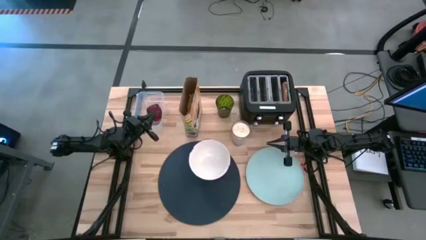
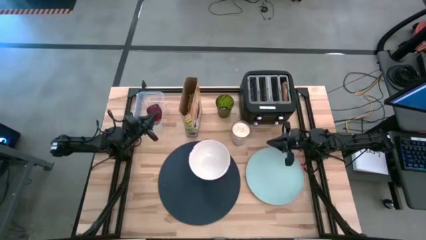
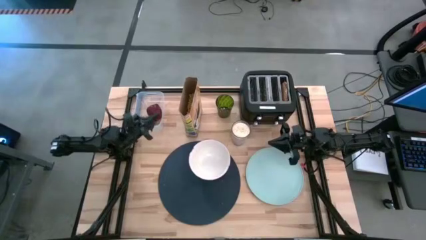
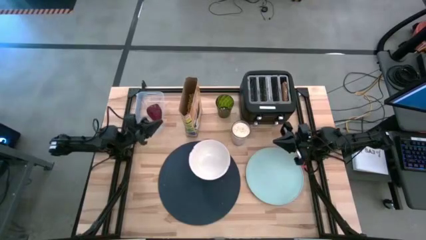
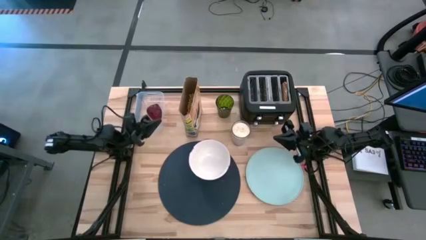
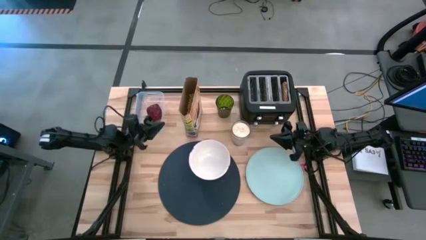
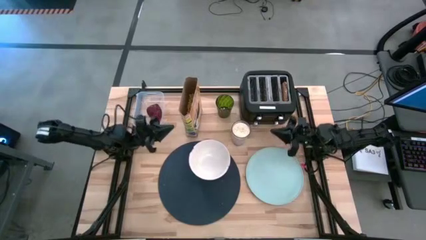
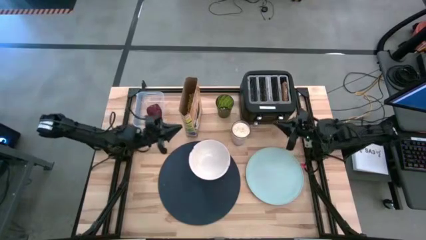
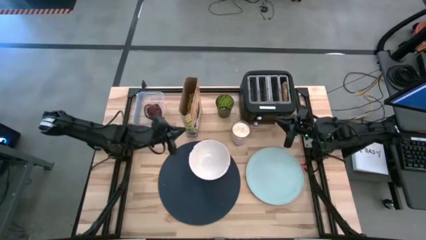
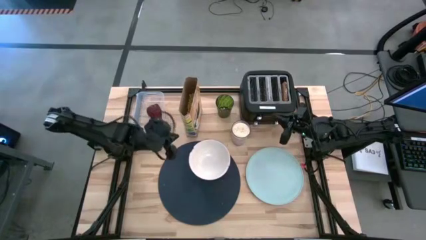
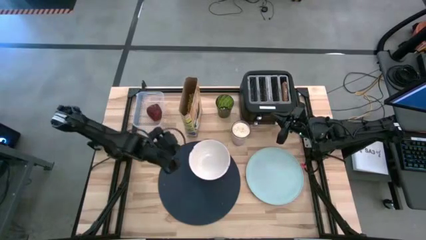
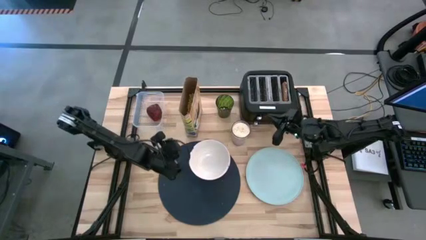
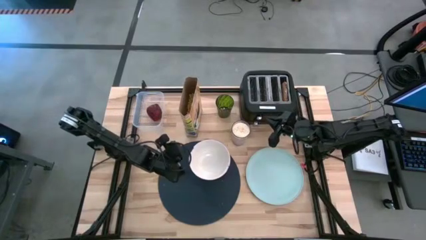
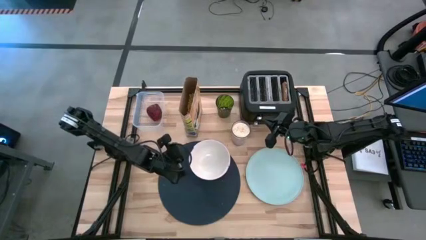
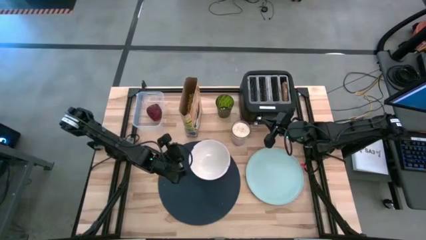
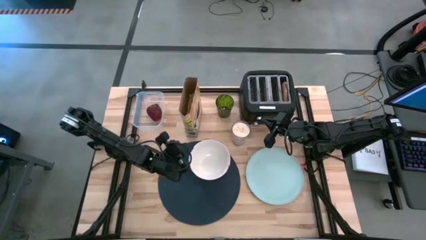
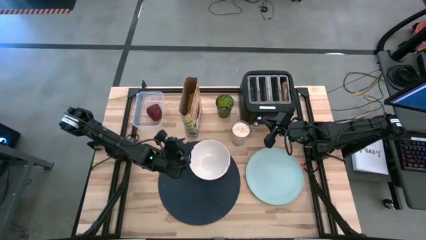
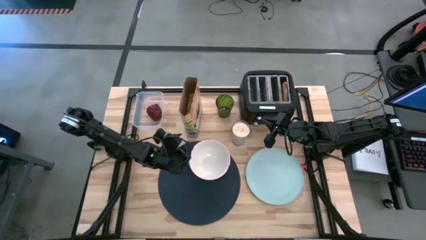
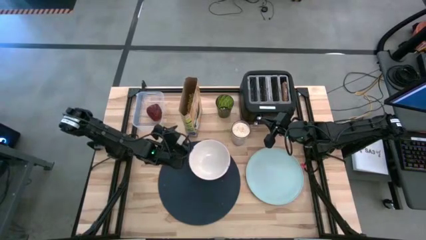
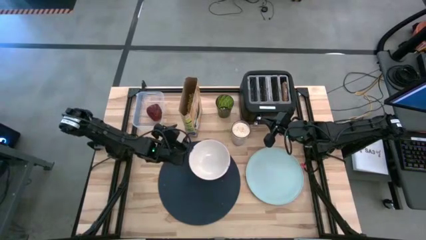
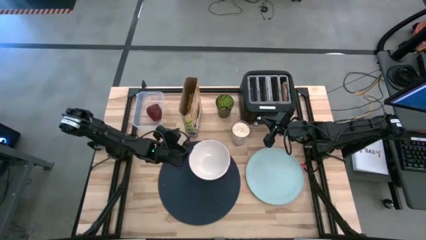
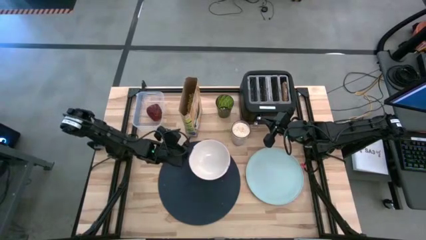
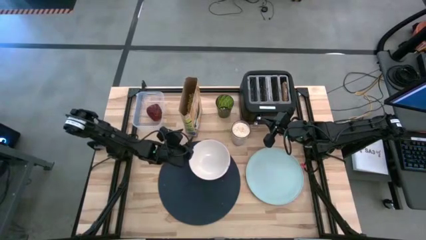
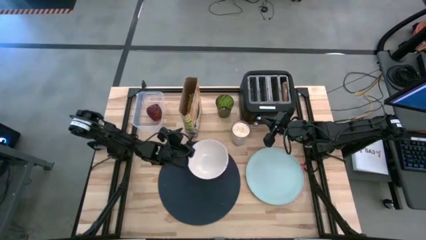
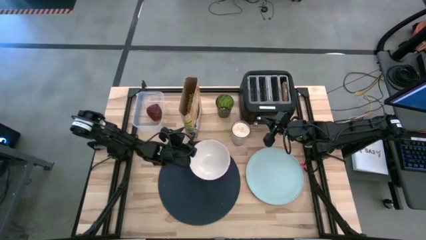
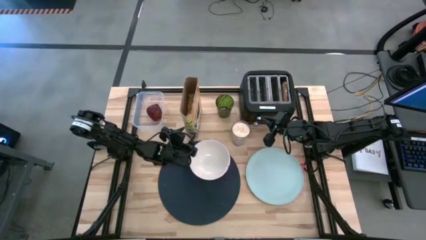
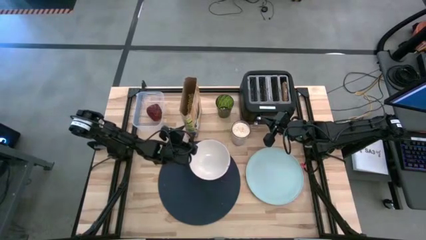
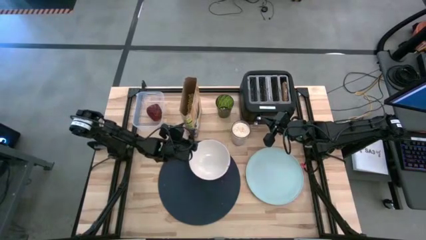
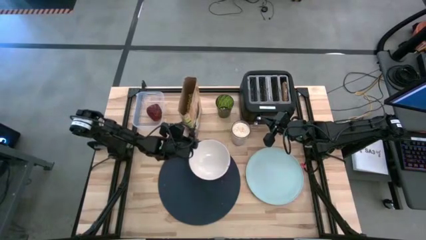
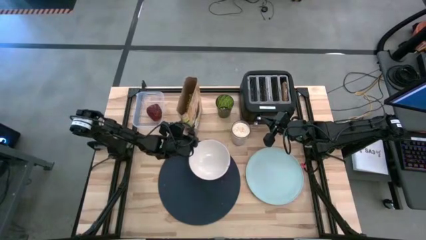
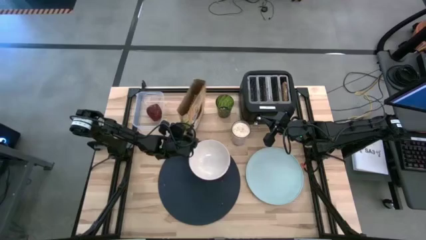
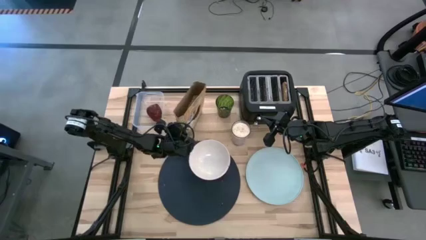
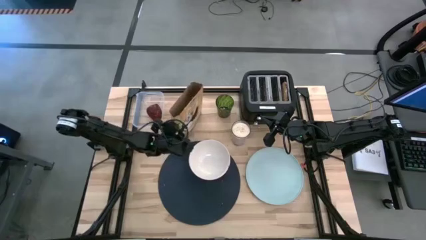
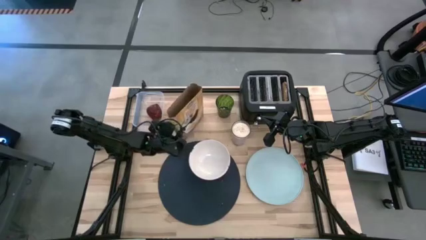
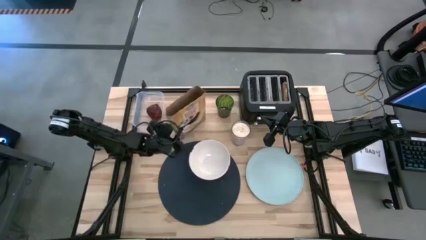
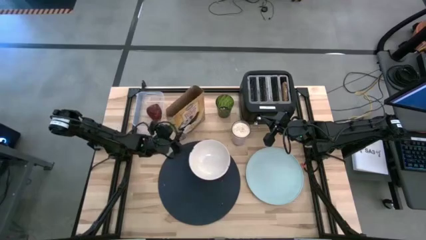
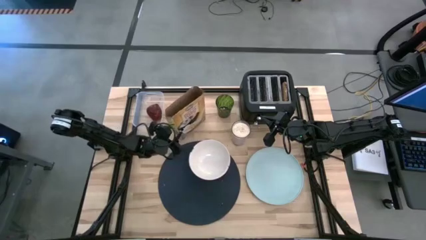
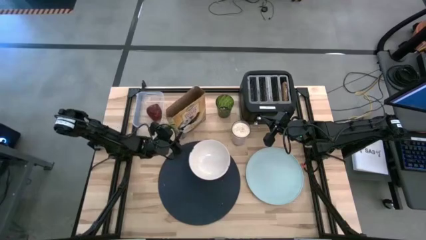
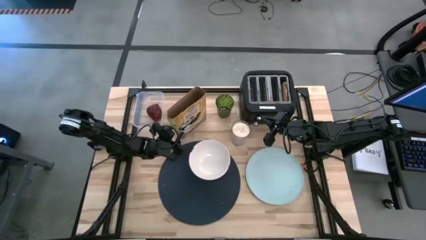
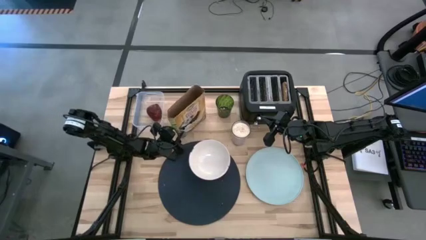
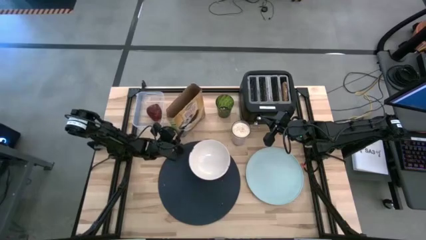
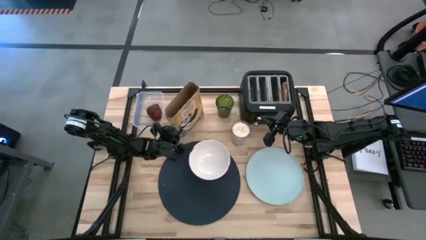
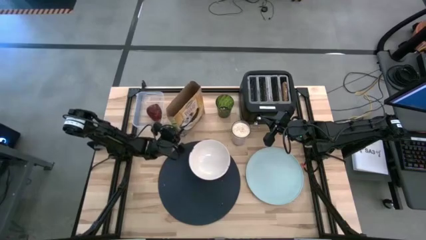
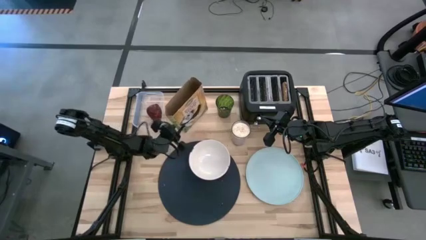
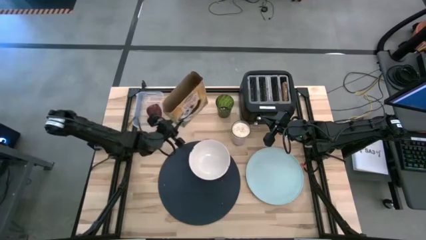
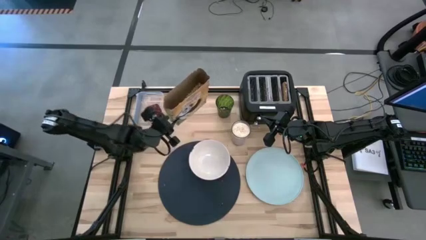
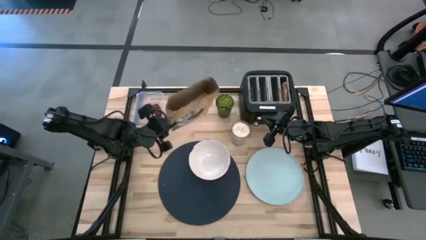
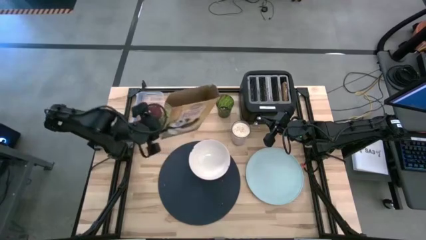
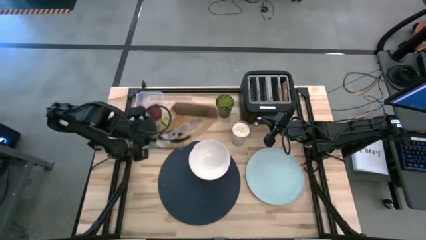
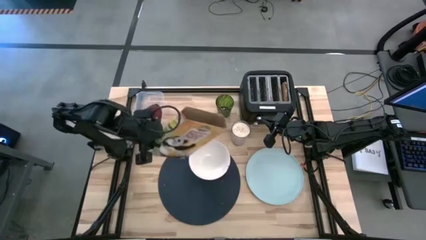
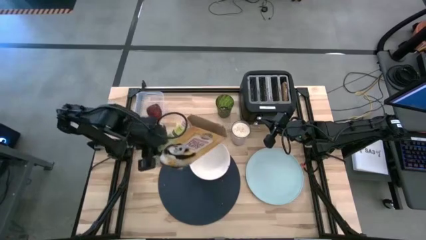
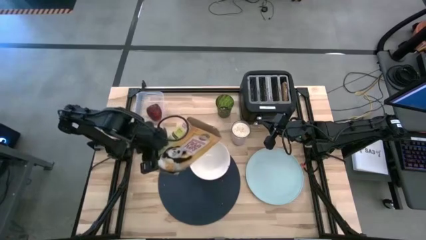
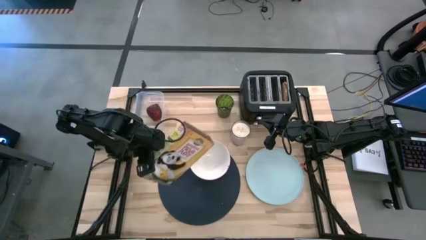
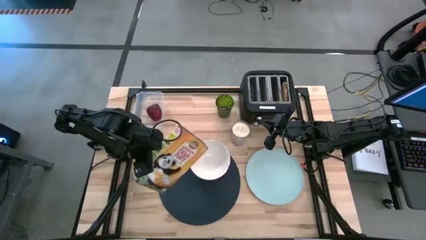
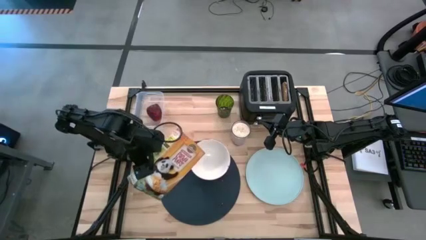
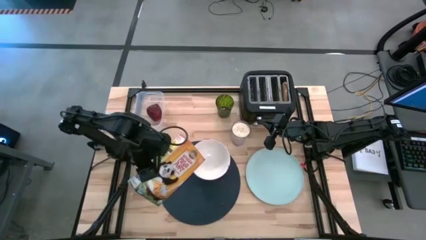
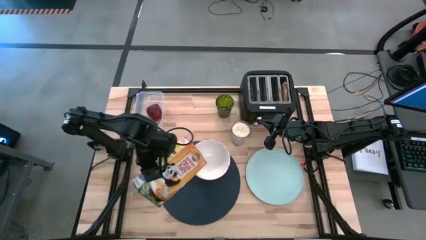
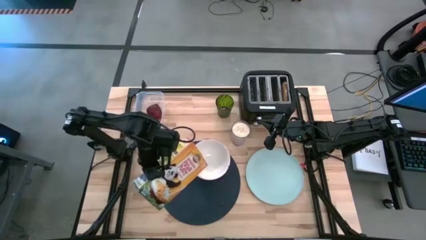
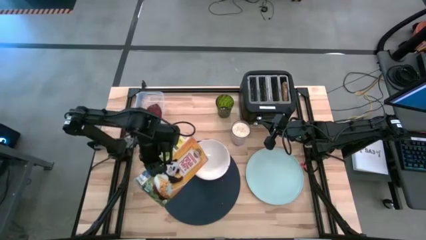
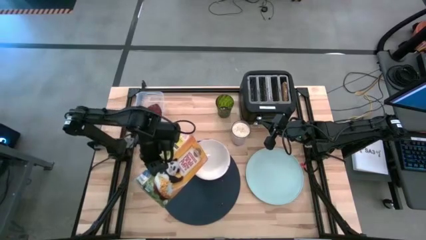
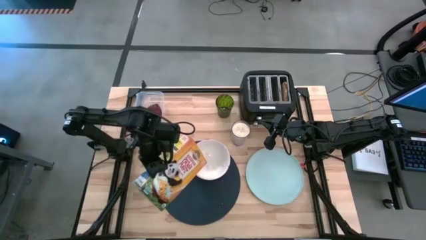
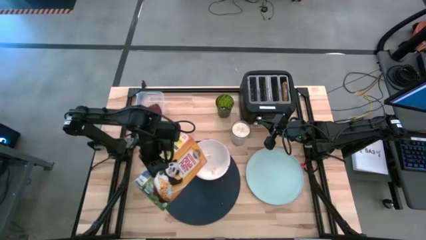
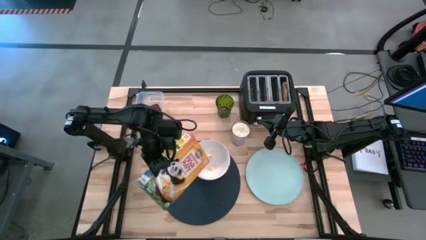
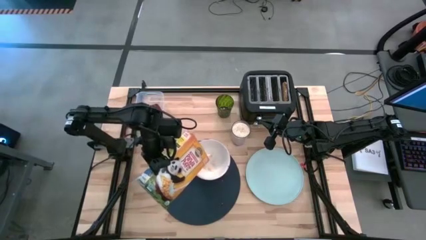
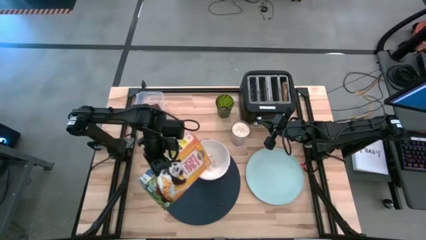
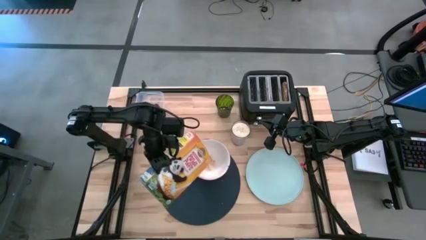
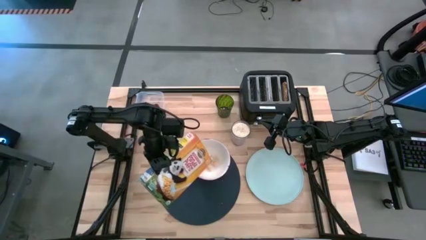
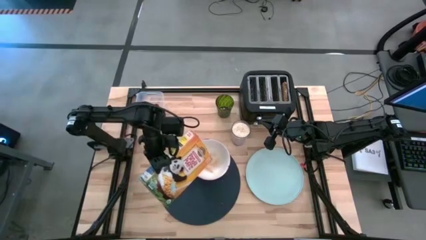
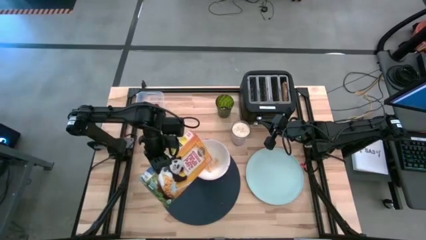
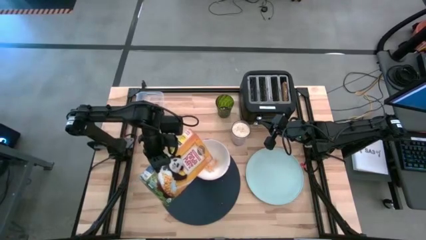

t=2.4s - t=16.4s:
Task: Arrange a breakfast setting
Pour the cereal from the yellow cereal box into the white bowl
